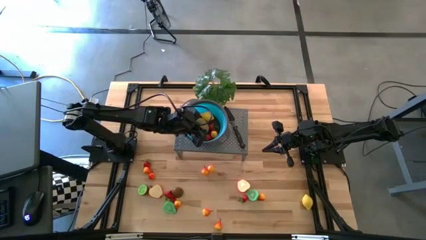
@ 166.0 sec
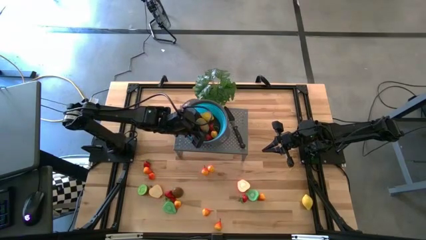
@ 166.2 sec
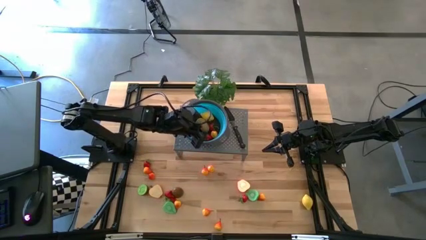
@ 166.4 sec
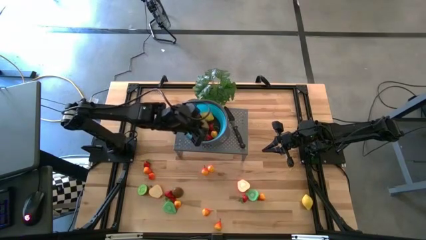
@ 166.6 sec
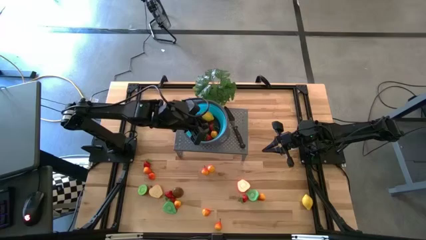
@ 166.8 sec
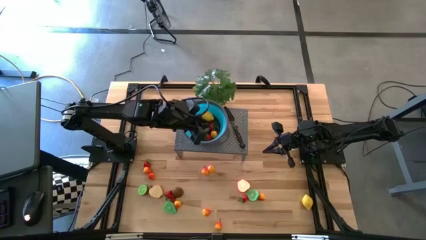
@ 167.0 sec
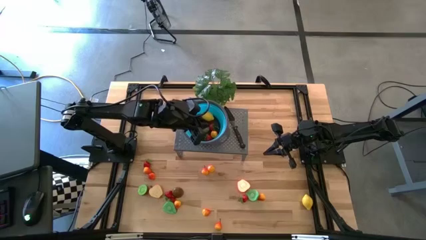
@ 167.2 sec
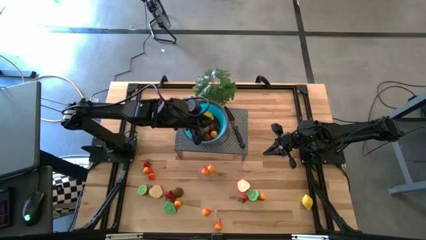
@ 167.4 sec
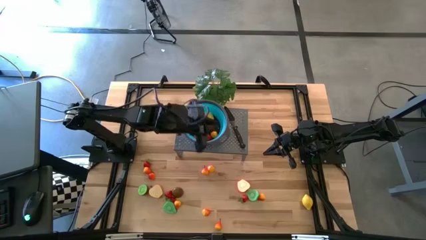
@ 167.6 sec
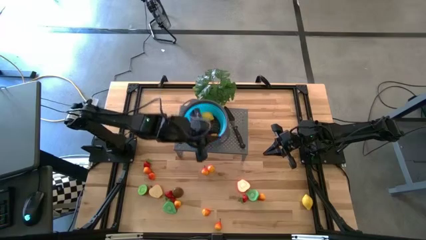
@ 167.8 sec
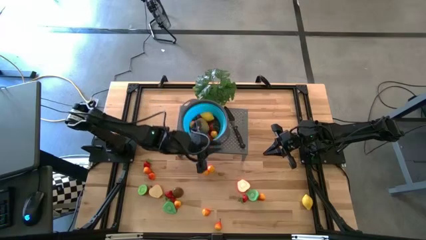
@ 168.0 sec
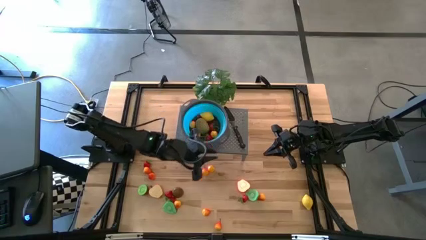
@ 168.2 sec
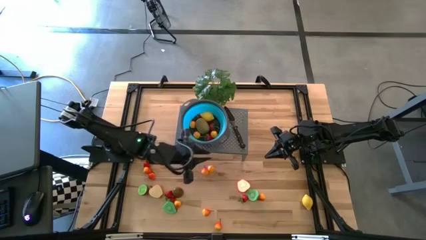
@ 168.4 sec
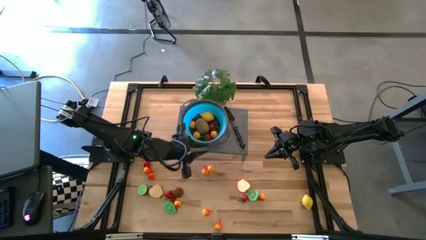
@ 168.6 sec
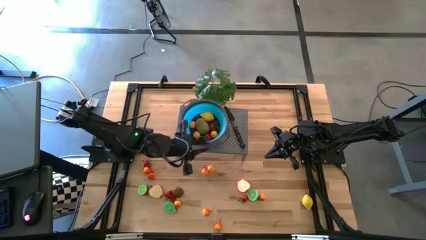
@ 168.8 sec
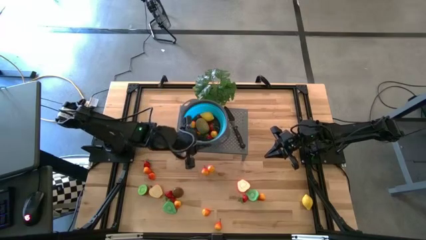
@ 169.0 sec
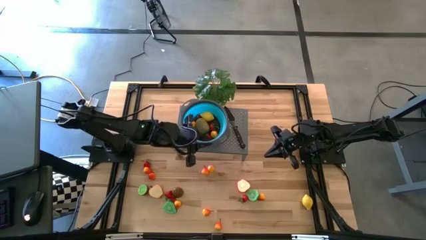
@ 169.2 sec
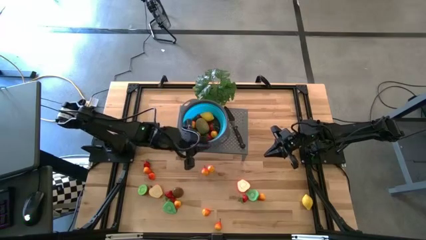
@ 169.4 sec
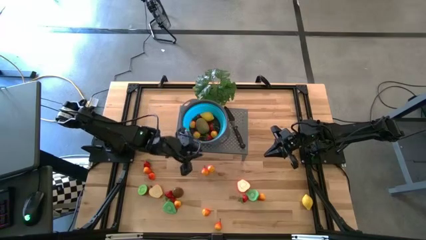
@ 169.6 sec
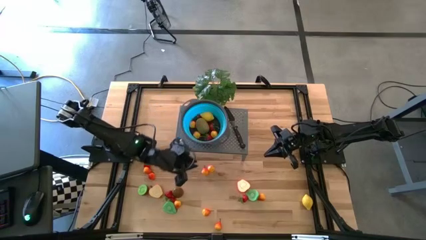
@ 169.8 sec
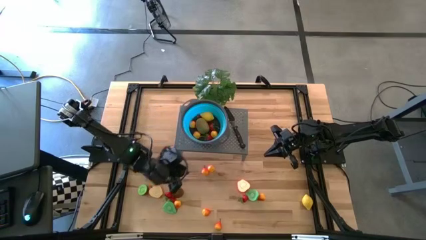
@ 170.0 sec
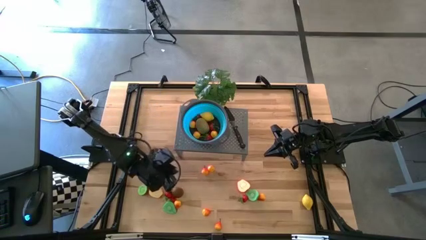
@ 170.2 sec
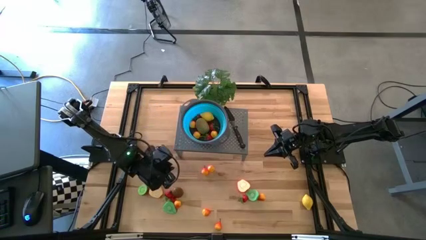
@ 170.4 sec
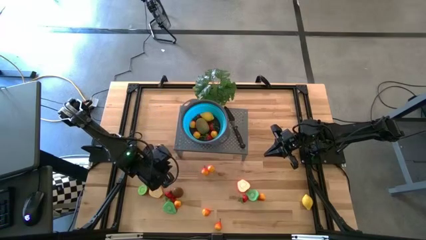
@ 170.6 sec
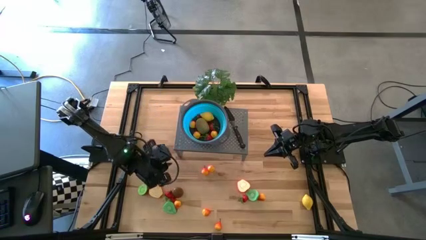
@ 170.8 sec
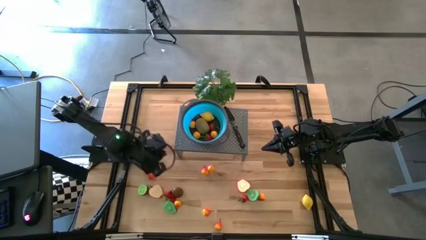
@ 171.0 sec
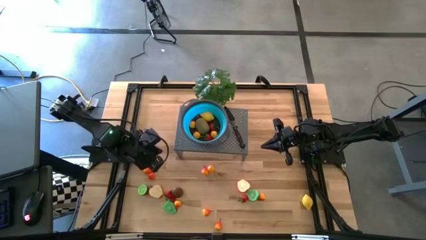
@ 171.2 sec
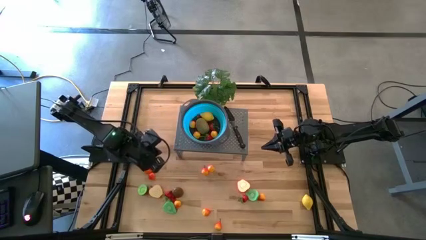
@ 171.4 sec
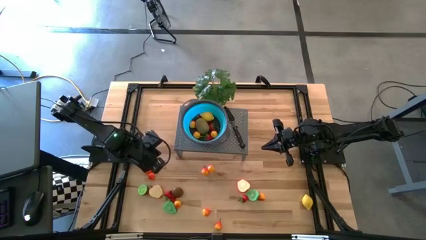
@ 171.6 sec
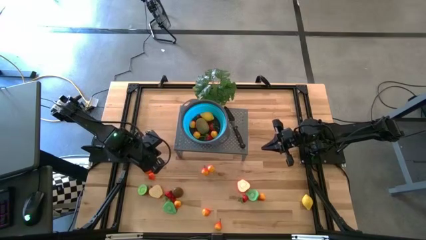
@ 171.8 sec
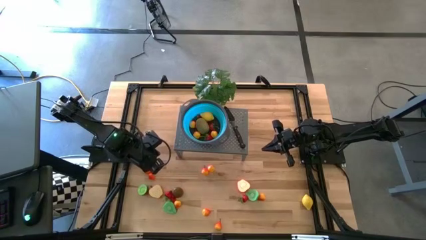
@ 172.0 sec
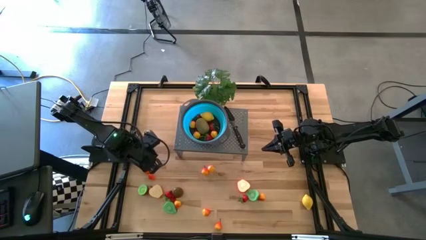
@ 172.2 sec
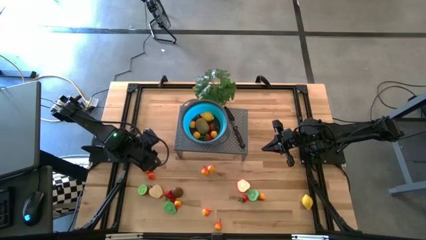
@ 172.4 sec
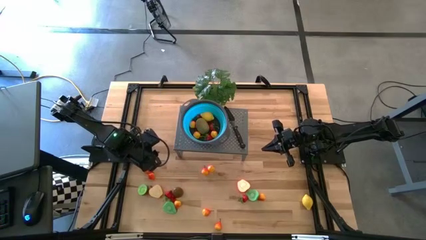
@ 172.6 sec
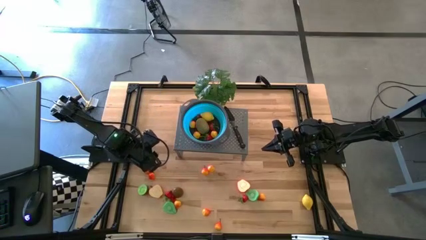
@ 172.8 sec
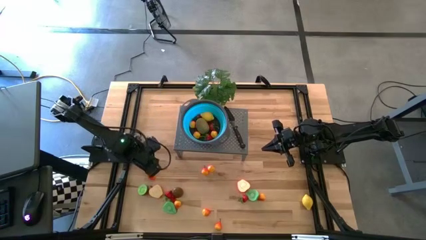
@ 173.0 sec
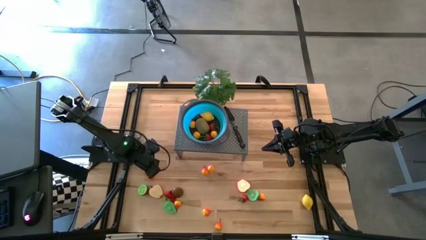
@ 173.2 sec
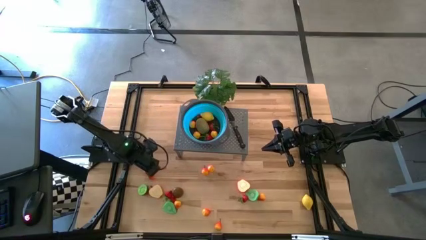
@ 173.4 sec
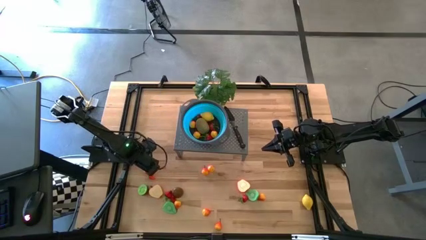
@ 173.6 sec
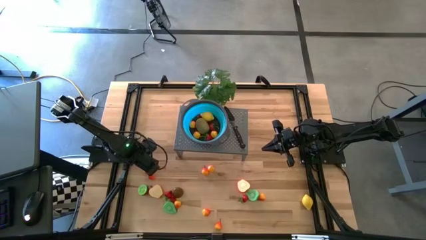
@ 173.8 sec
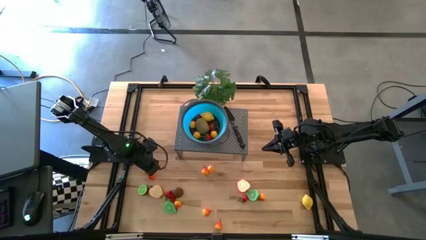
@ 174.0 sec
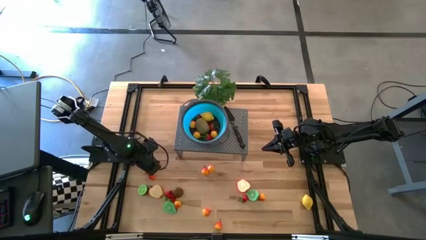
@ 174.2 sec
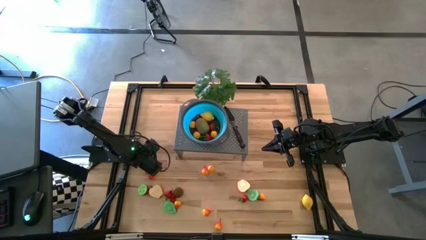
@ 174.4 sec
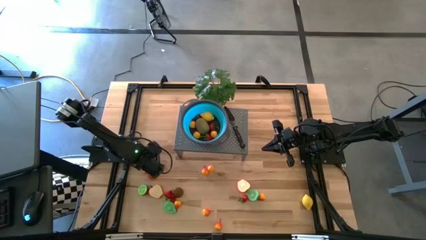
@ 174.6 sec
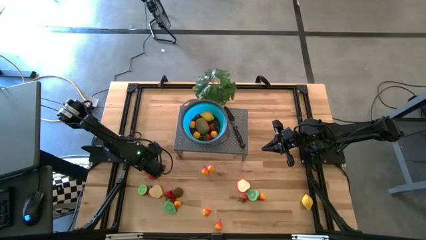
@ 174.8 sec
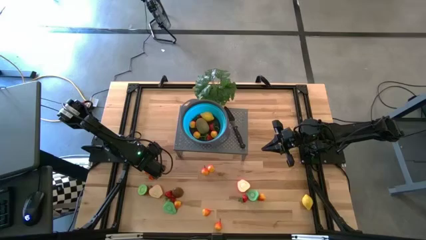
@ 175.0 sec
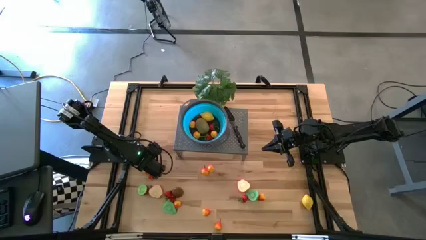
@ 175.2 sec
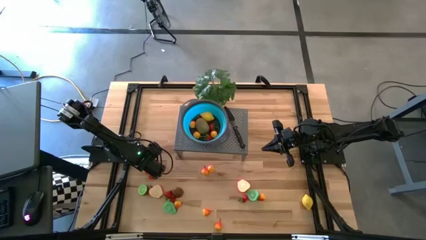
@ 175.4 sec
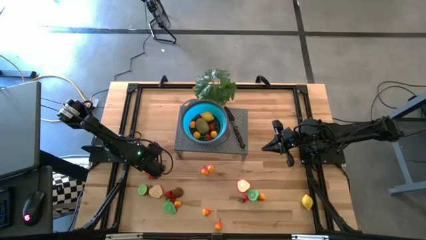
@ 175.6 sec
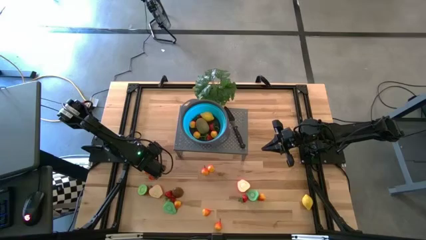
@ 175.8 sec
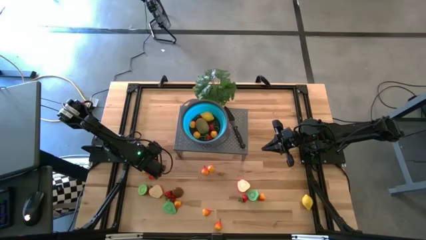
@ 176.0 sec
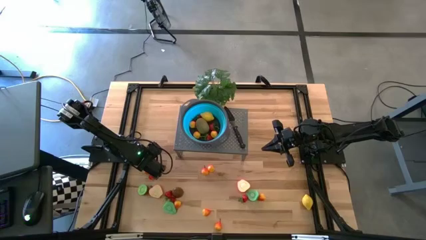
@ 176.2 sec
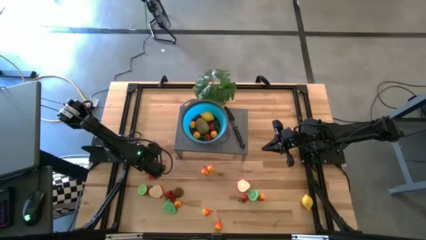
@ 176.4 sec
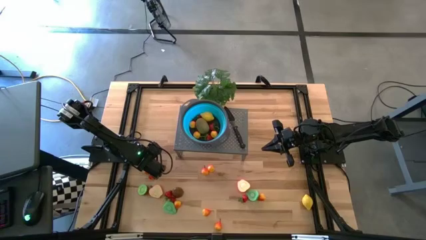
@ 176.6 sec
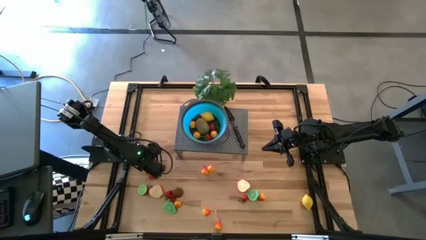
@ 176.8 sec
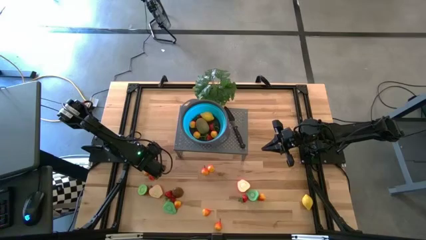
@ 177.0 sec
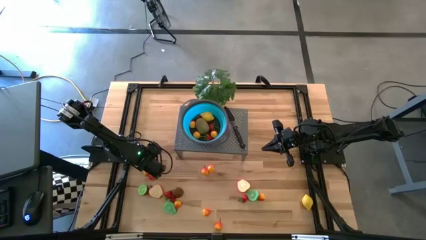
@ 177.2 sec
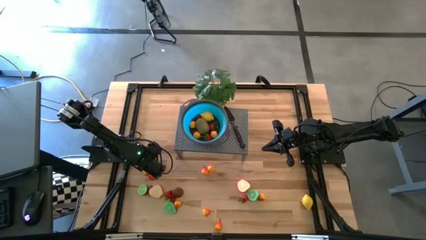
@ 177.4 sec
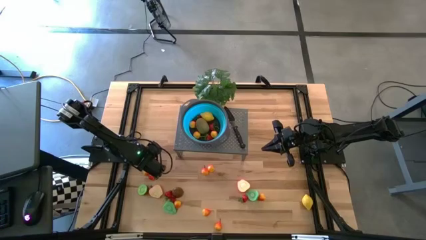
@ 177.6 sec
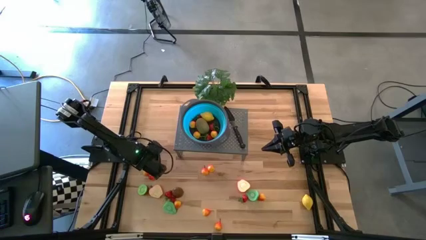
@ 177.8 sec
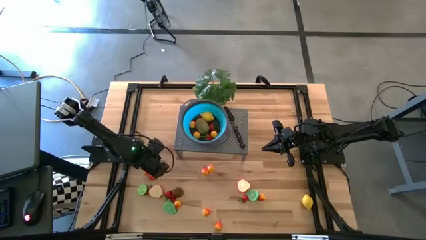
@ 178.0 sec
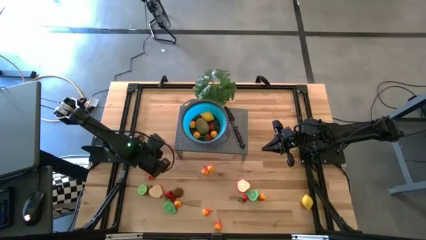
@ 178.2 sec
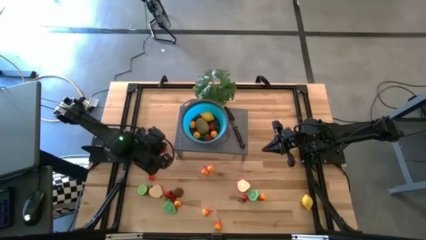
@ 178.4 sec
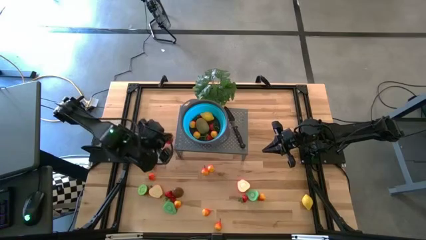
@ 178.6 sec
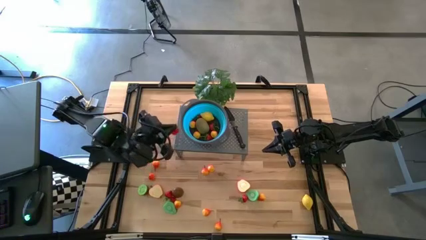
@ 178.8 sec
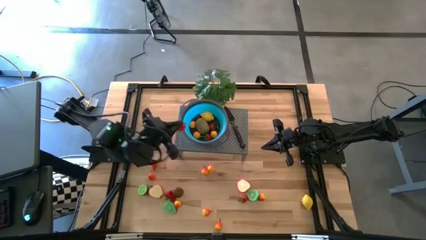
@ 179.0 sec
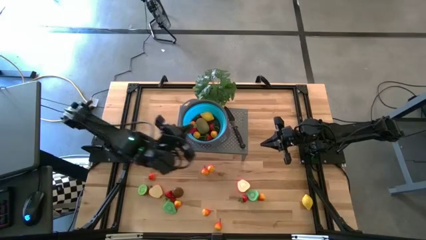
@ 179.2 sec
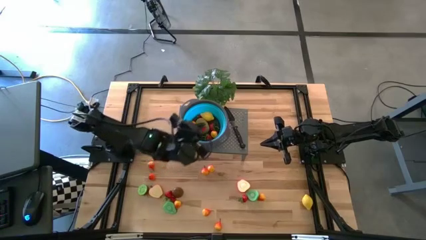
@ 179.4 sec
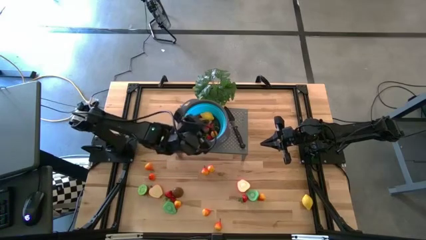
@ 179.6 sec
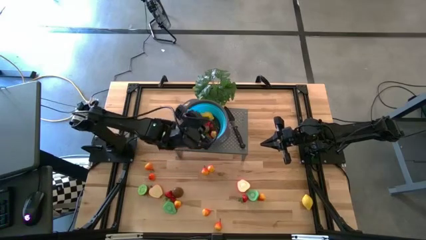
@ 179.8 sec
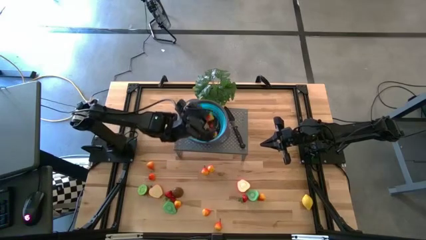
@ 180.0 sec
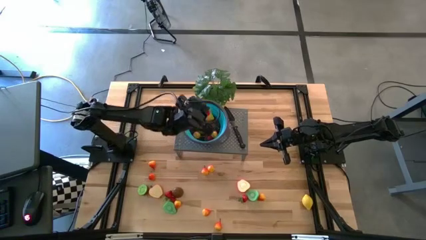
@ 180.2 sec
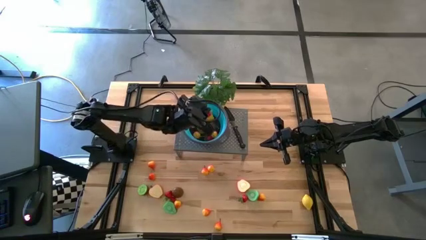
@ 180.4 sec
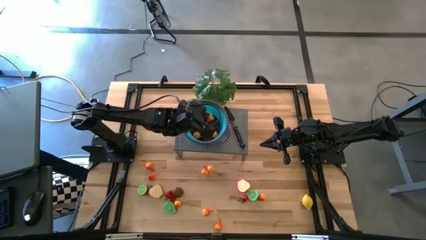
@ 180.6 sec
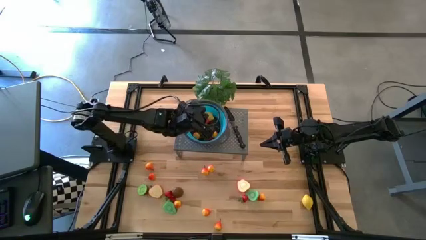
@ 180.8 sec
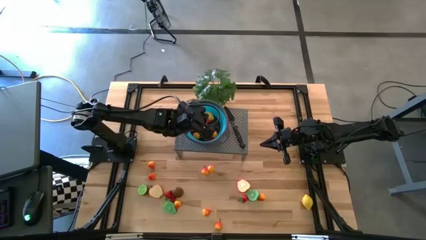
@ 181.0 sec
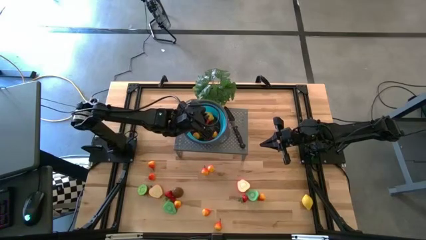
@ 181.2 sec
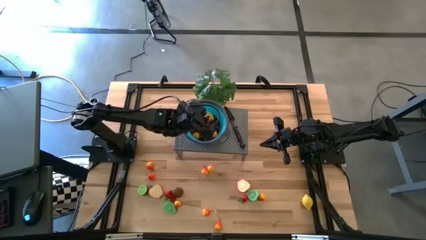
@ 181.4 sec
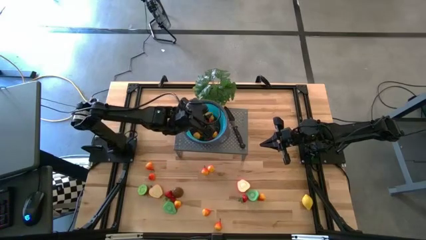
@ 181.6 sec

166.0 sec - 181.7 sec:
Task: Pick & Place Fruit
Put the strawberry into the blue strainer bowl on the shelf
